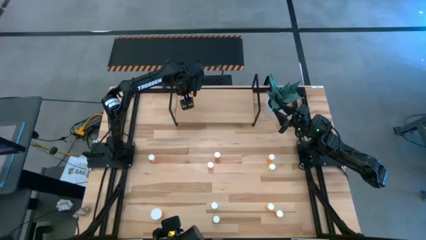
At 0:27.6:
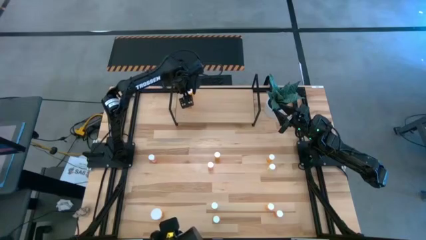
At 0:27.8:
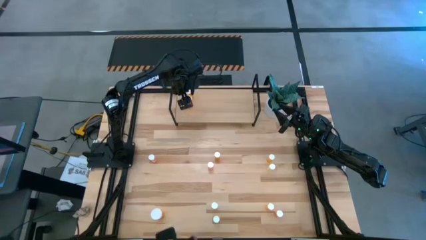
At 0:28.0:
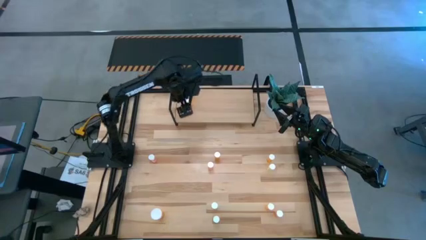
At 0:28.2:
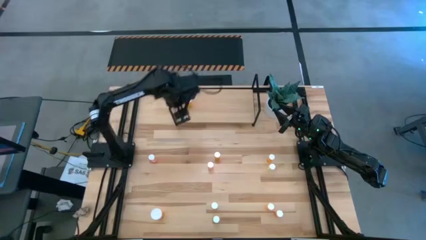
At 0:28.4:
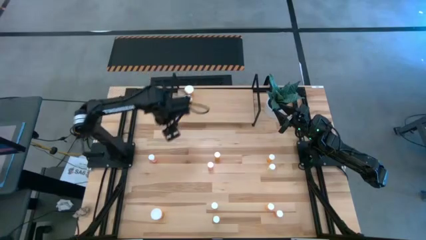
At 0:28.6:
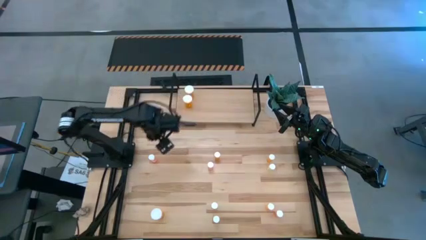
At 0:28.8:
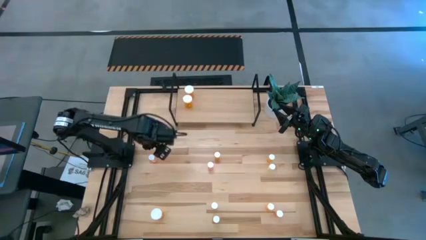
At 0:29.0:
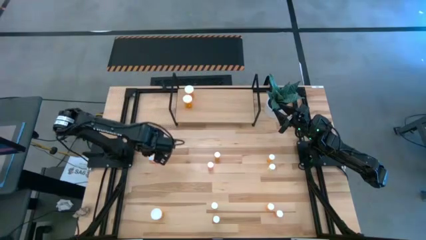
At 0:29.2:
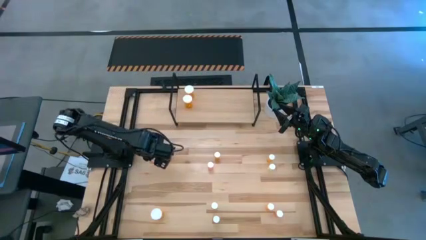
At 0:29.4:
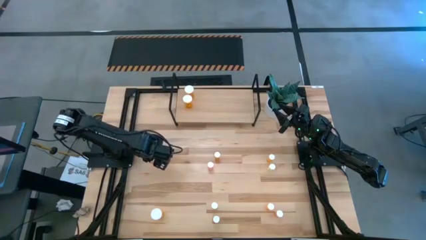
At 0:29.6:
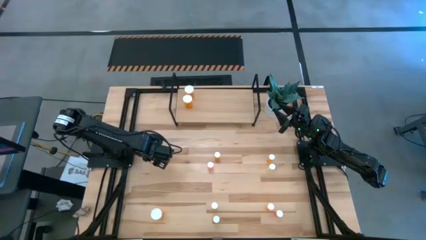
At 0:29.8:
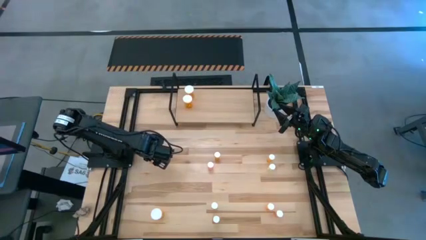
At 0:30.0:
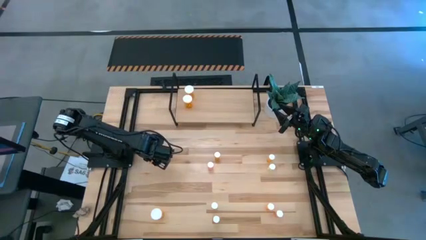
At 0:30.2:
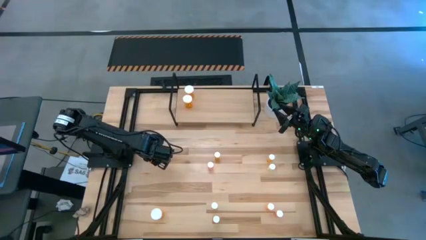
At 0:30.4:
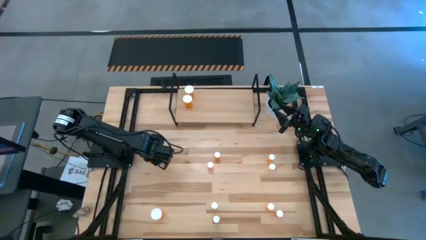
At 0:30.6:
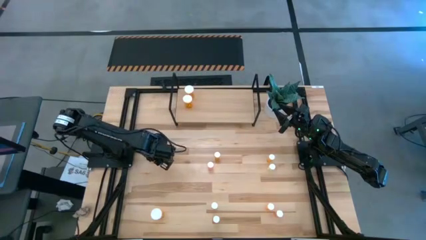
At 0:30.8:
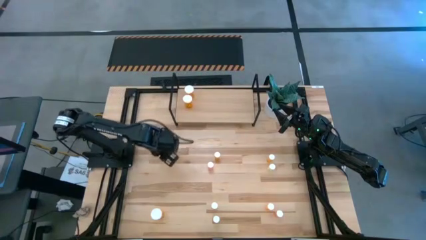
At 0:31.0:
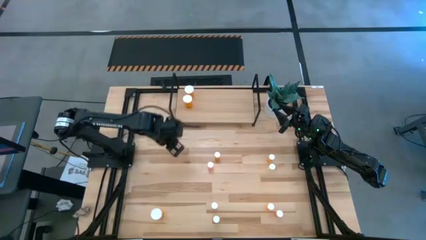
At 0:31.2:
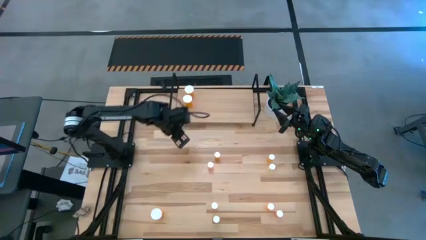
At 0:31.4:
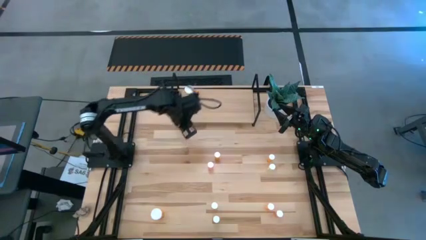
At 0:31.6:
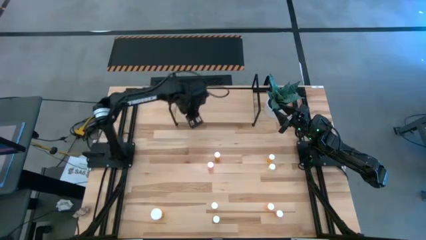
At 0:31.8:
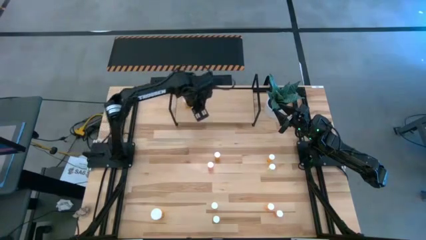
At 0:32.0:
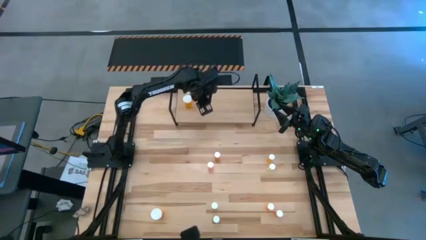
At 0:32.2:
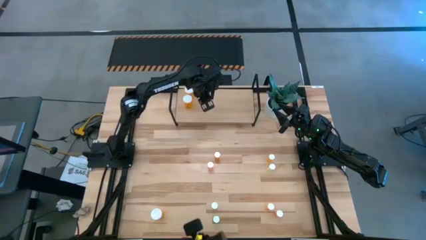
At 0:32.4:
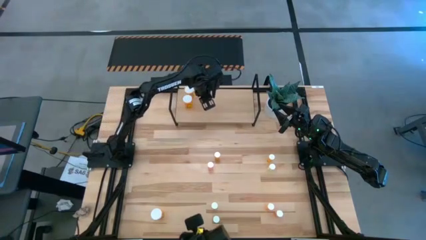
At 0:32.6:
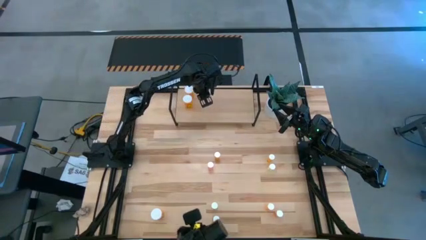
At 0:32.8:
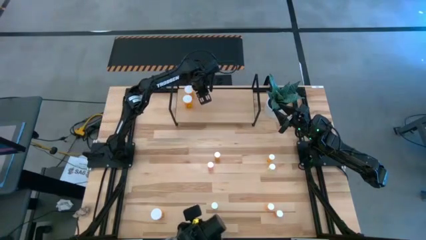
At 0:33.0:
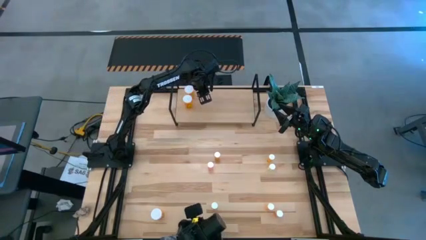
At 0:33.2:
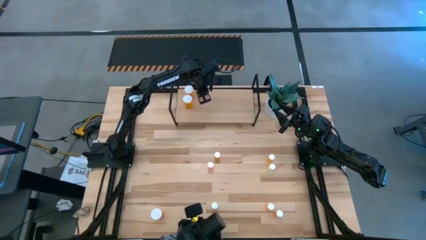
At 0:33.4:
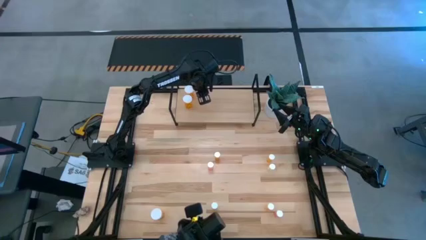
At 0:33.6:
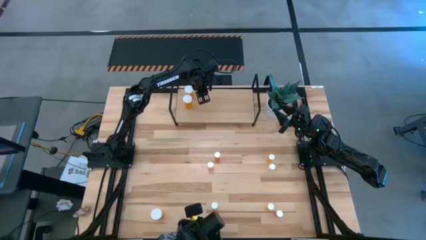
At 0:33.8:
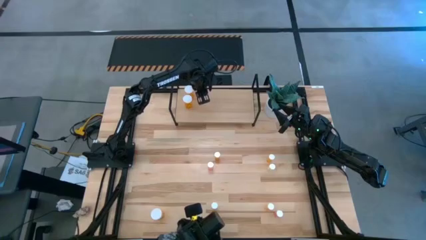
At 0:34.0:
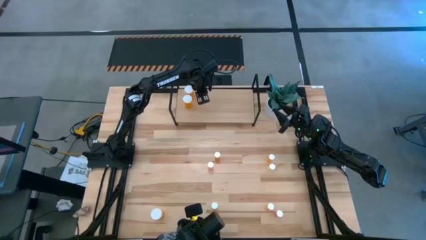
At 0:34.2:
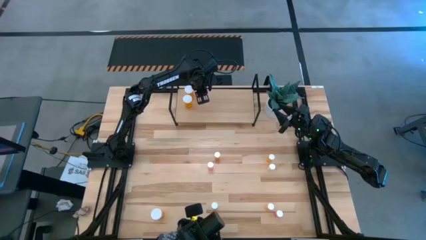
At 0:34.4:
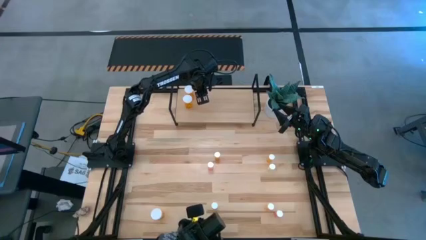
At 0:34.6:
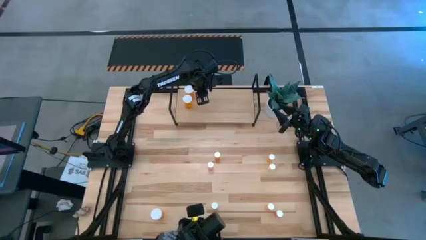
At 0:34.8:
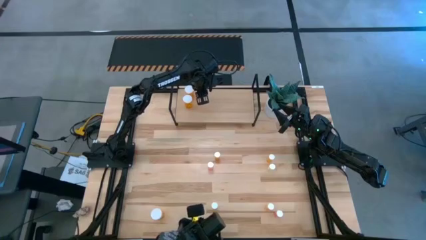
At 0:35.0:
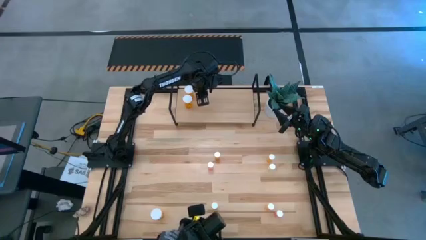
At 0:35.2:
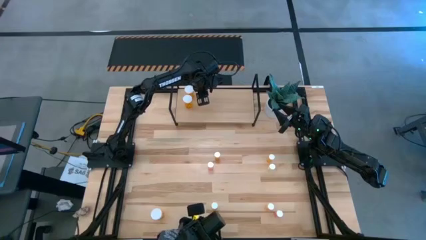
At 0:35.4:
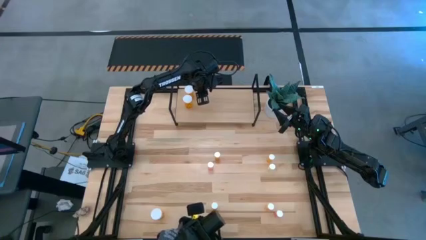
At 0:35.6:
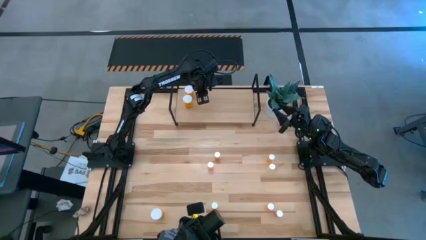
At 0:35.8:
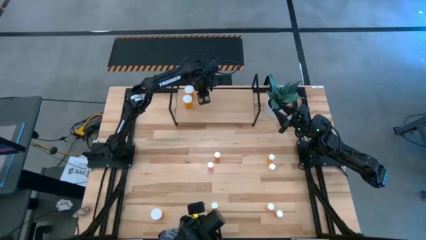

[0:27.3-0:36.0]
Task: Pick and place medicine bottles onto shelf by color
Put the top left red pill bottle on the shelf

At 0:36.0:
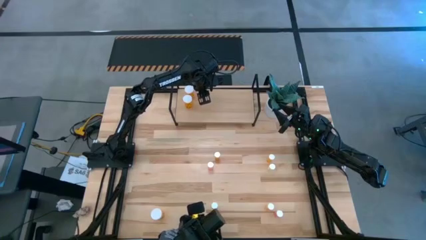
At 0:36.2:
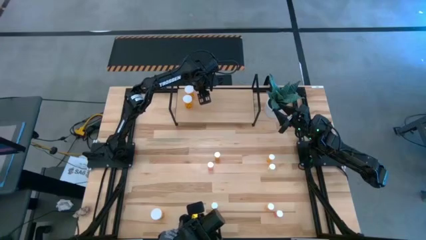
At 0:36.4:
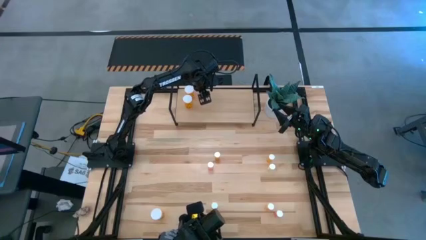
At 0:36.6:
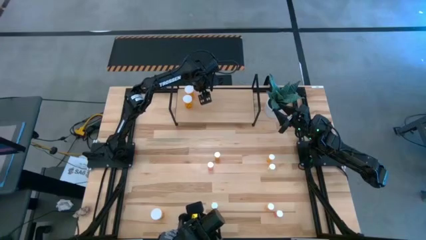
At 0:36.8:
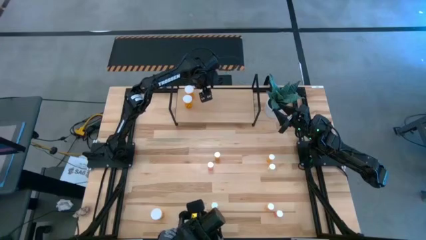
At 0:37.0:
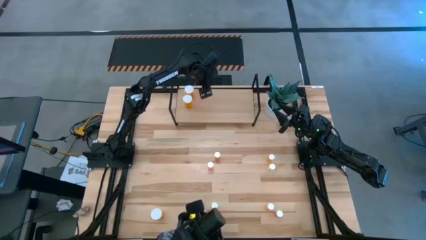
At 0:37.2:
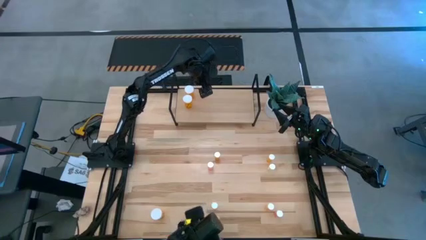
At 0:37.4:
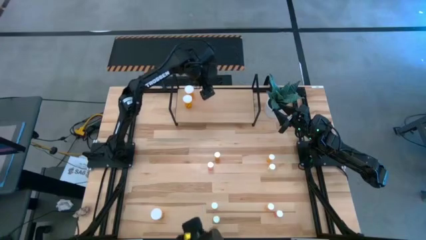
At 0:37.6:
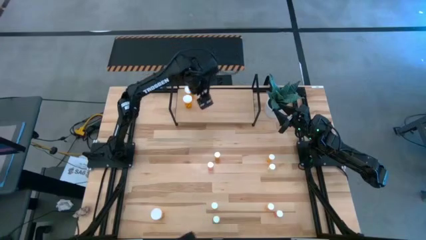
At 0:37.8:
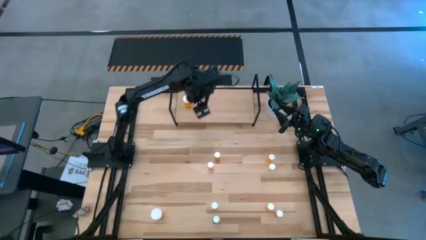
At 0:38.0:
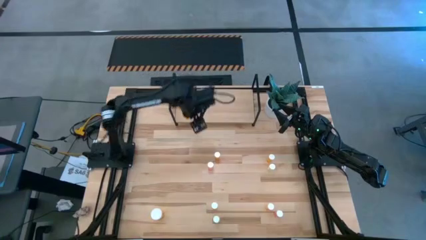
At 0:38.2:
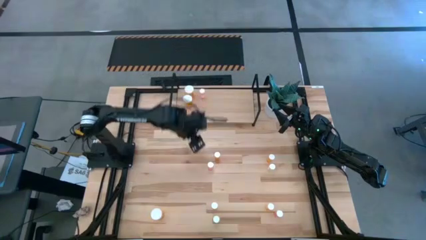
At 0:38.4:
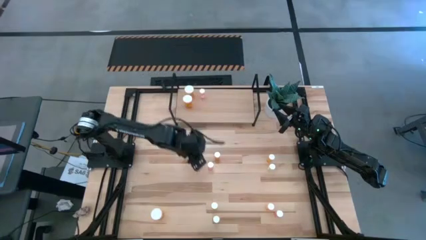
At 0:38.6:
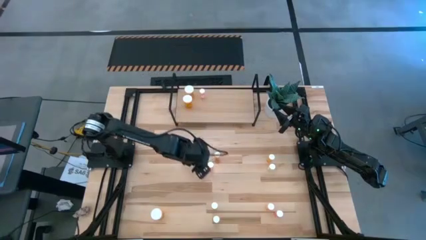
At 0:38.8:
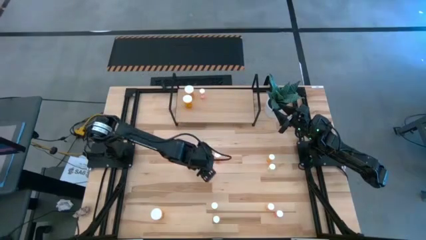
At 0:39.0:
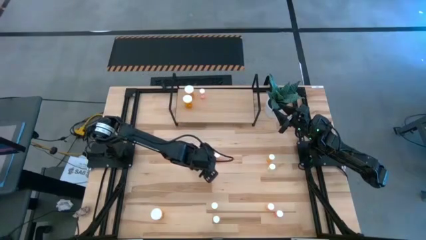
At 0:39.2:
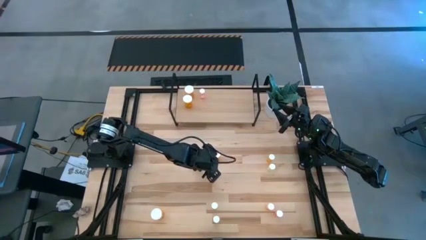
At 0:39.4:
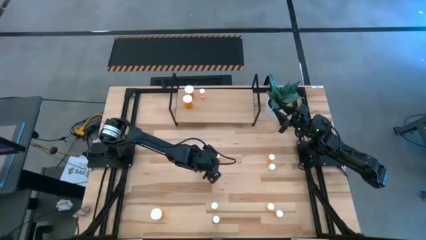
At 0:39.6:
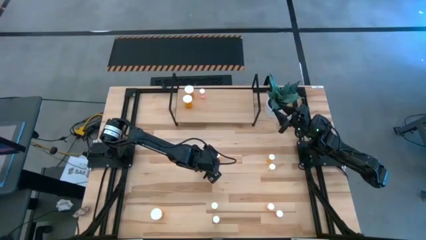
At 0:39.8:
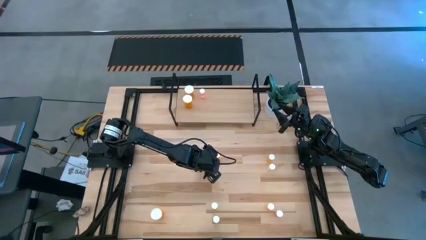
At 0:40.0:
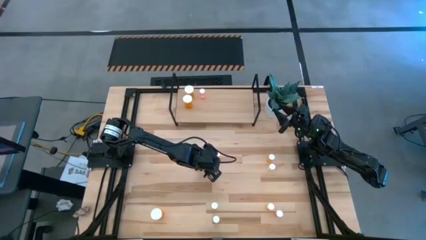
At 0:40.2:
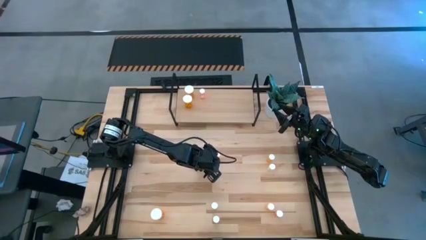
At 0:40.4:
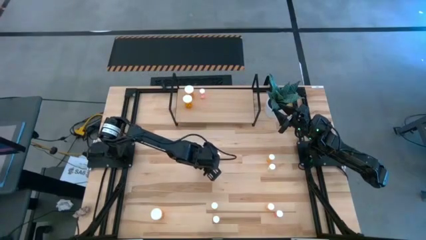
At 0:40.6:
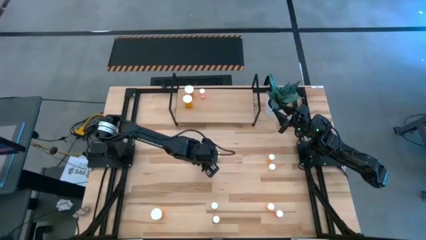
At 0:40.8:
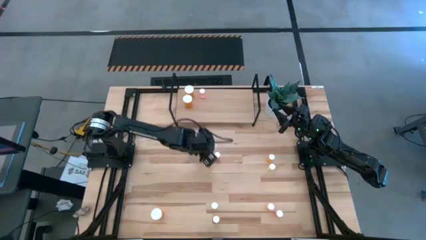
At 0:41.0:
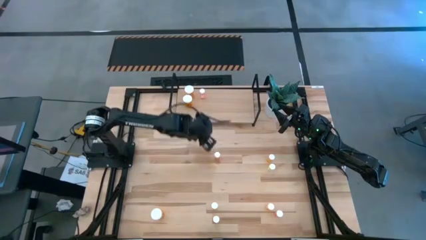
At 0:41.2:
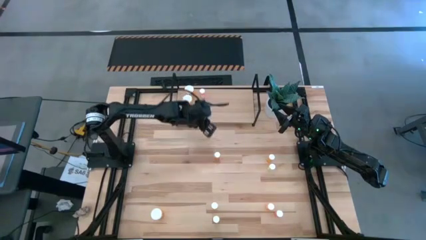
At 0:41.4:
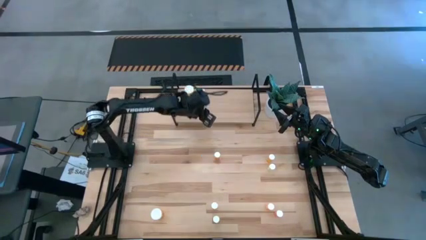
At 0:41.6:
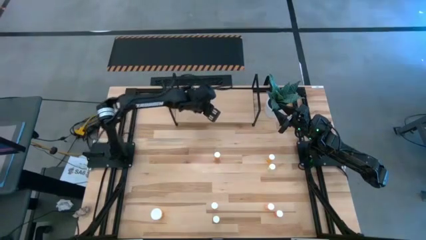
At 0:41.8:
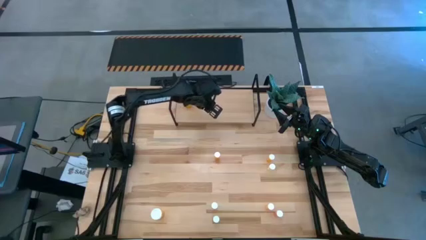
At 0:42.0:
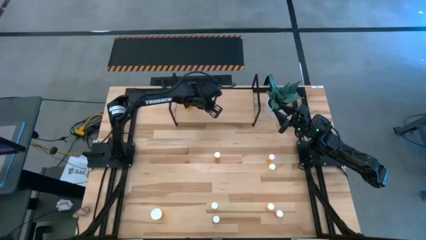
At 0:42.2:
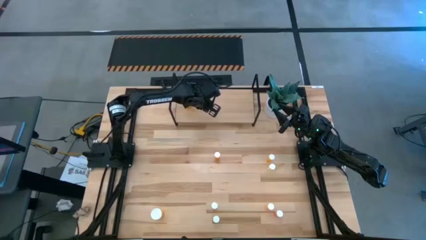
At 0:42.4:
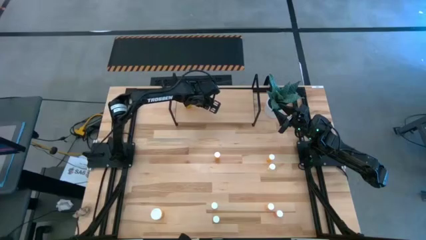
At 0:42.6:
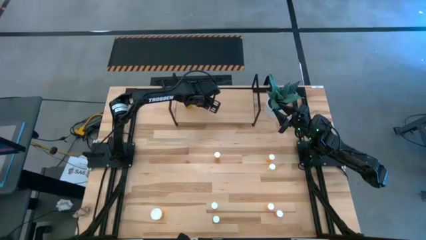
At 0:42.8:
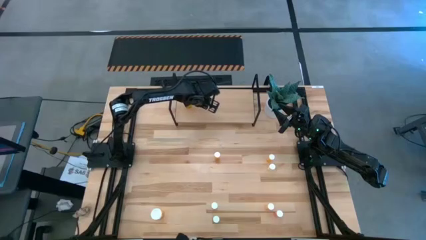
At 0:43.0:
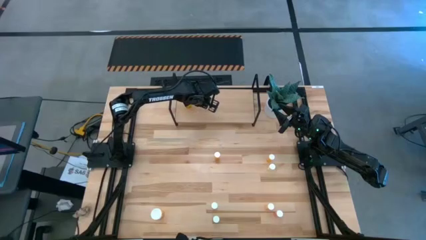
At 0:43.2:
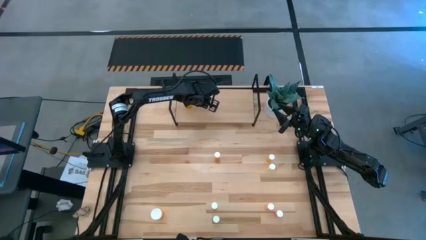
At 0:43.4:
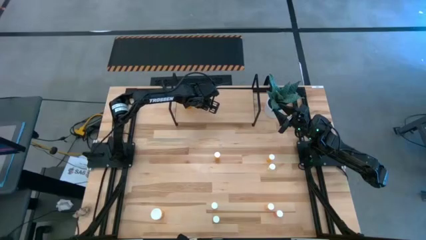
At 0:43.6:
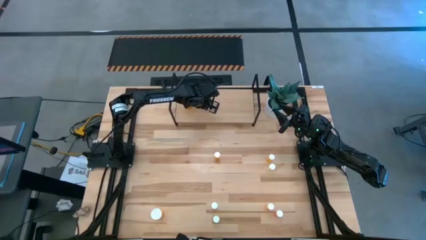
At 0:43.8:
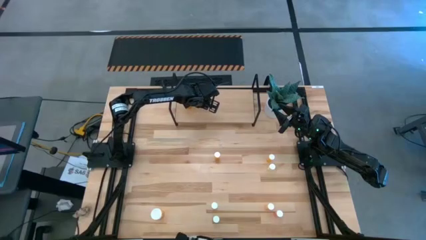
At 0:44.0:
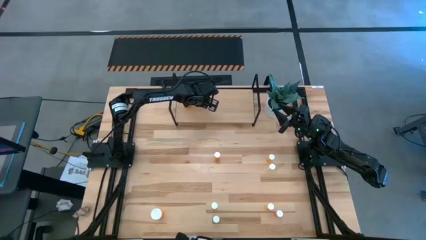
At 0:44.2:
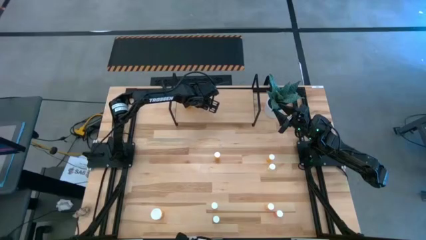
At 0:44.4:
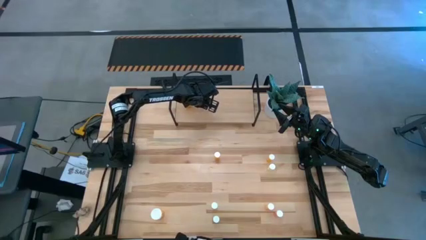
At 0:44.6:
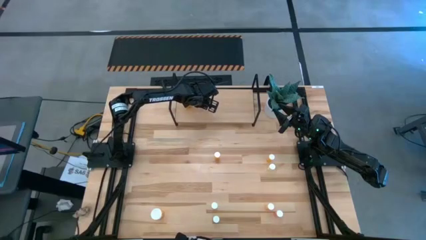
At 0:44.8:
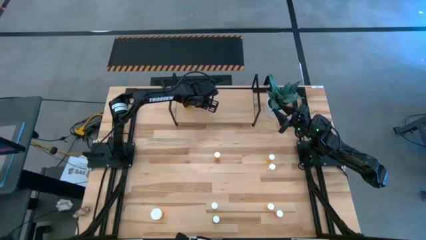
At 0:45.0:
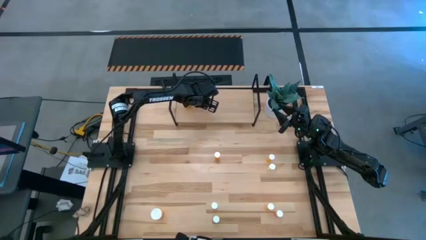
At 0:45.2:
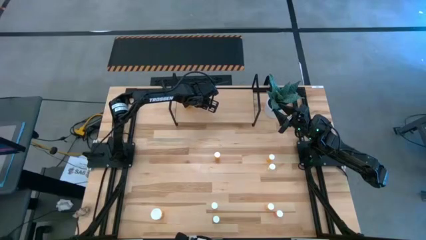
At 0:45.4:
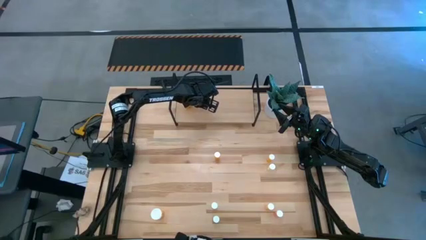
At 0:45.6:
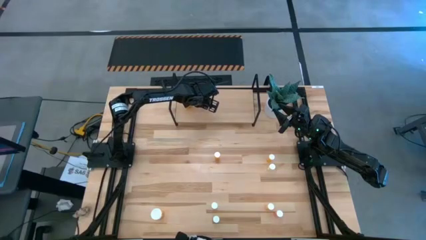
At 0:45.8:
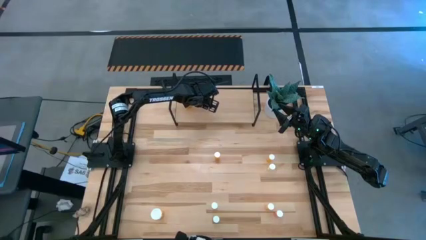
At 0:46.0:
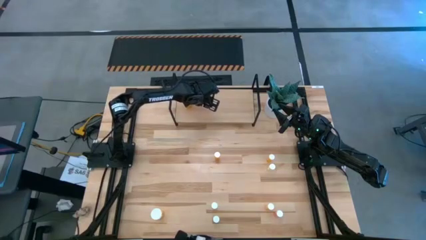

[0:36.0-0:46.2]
Put the top red pill bottle on the shelf aligned with the other red pill bottle
